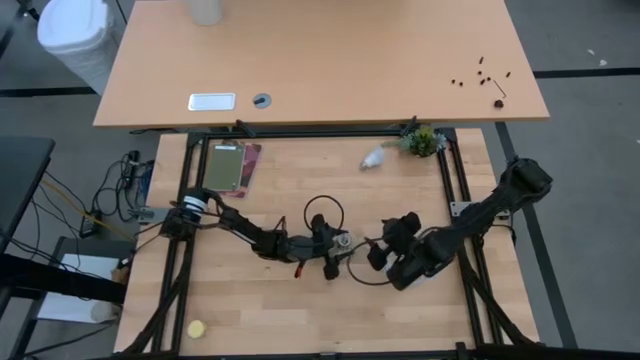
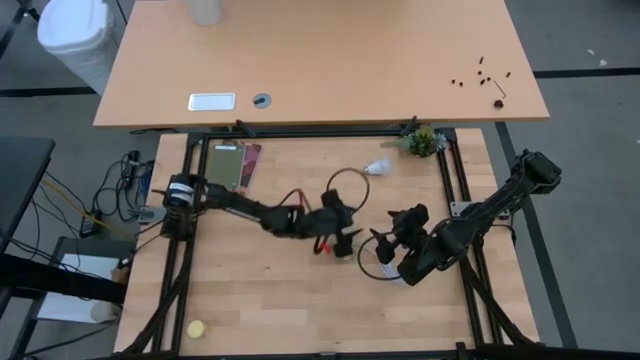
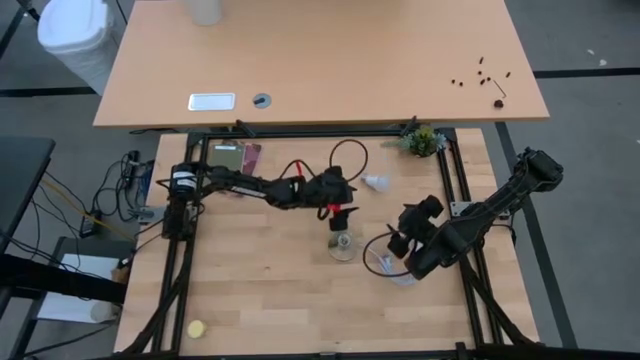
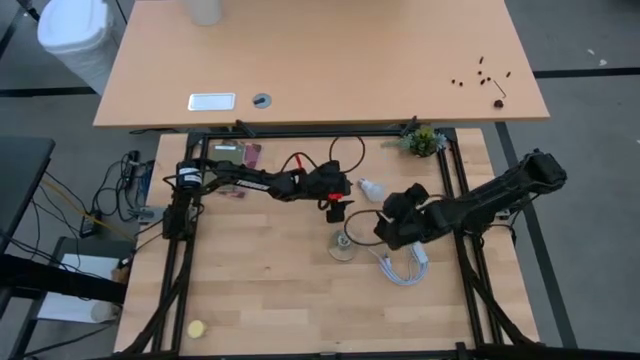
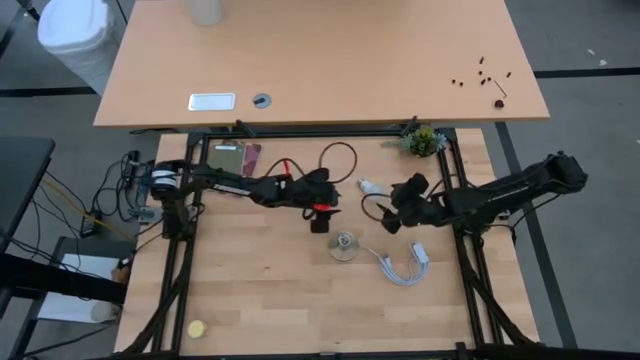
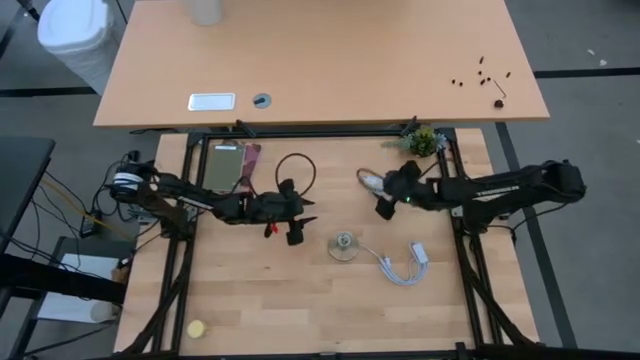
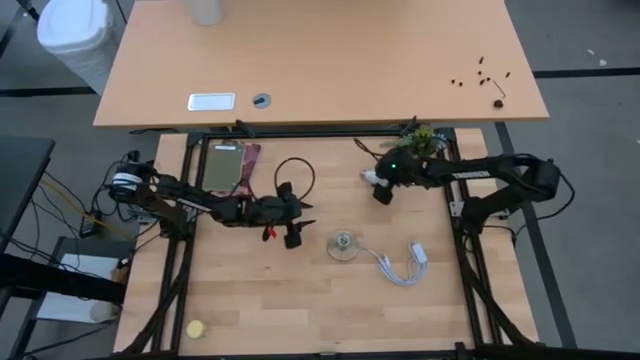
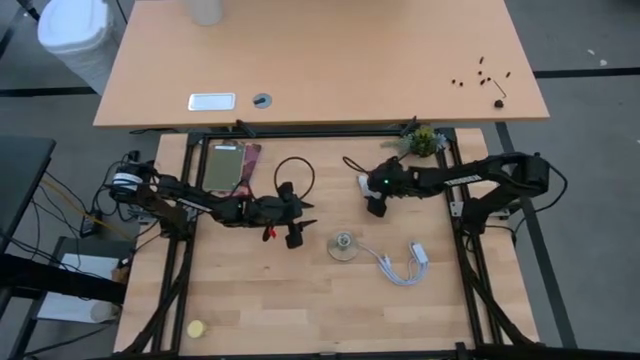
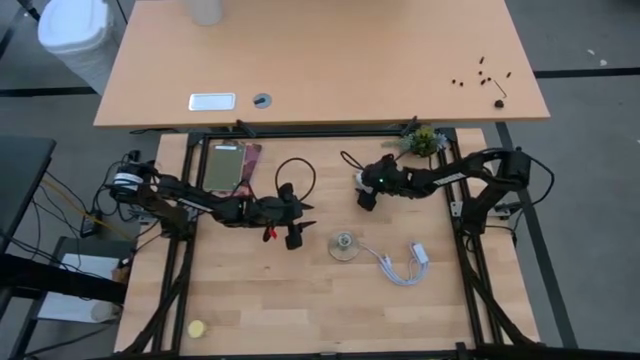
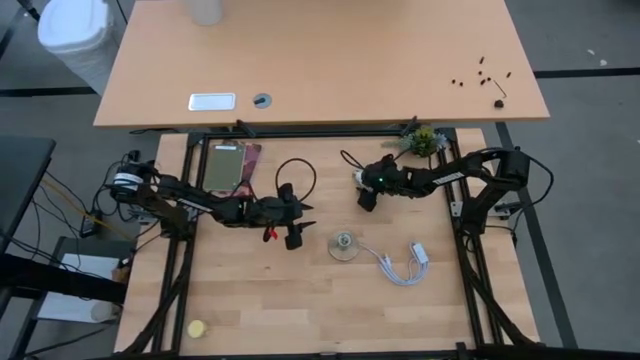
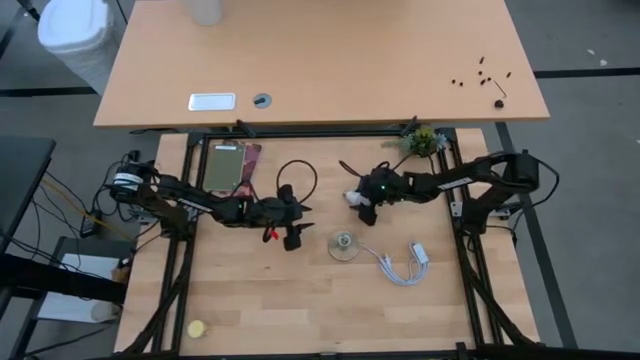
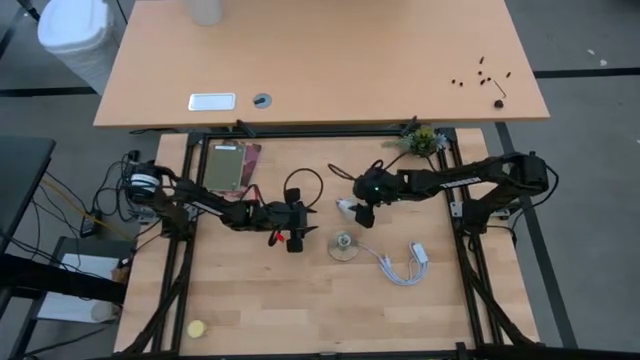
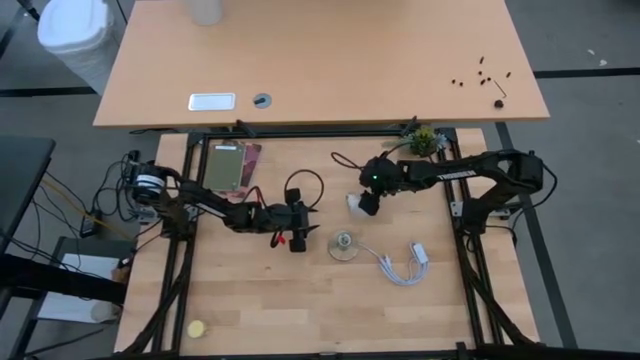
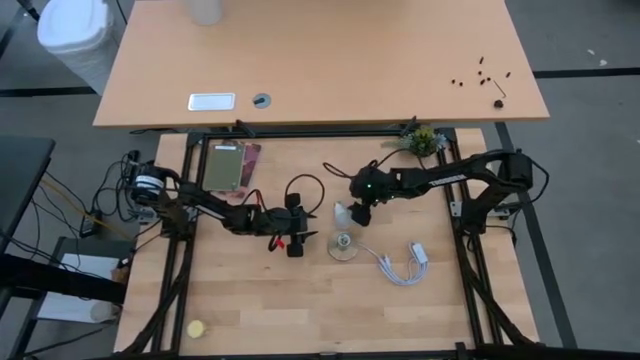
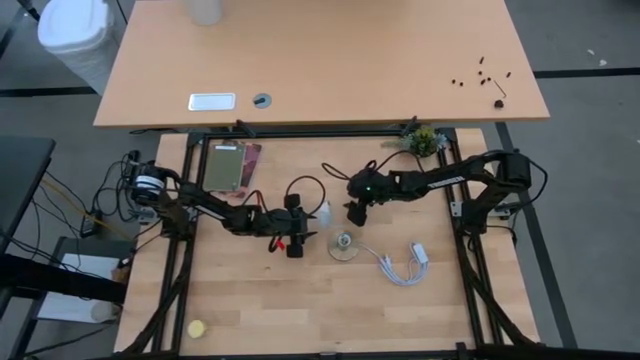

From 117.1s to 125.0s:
Task: Screw lightbulb
Move the white lightbulb to the center of the table

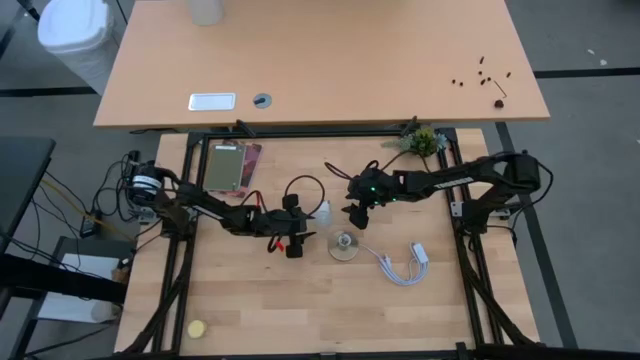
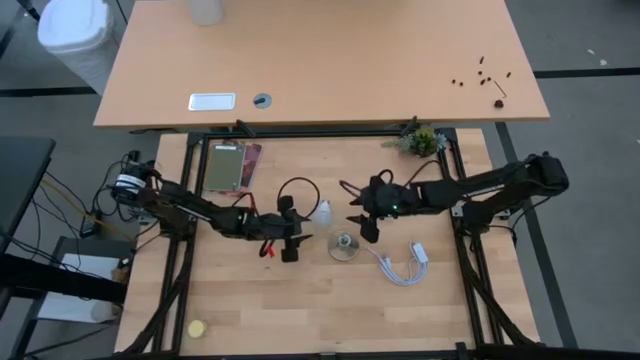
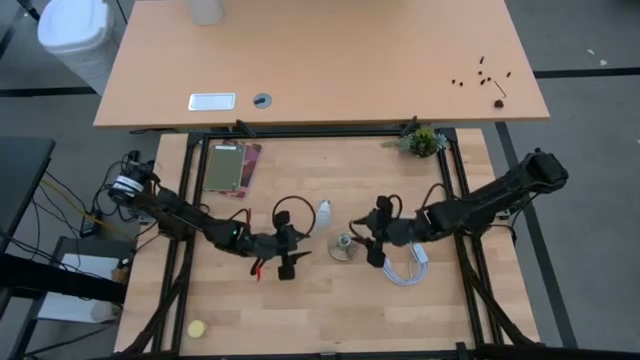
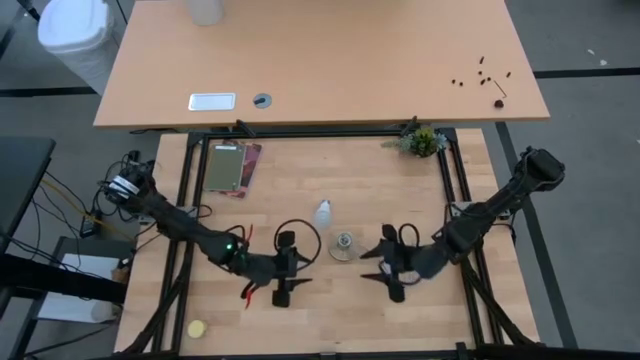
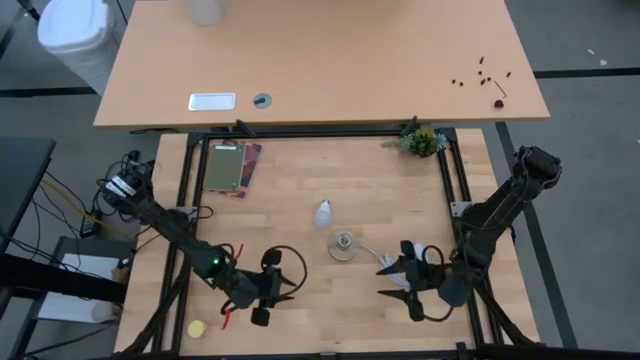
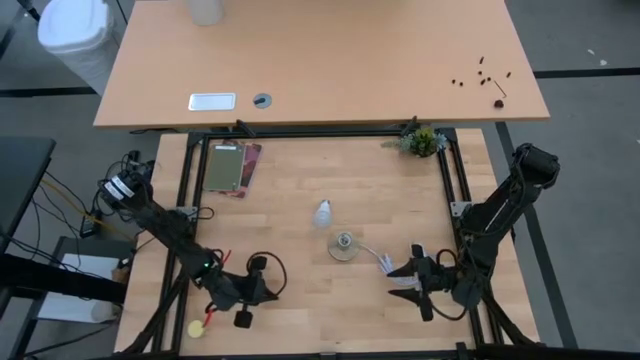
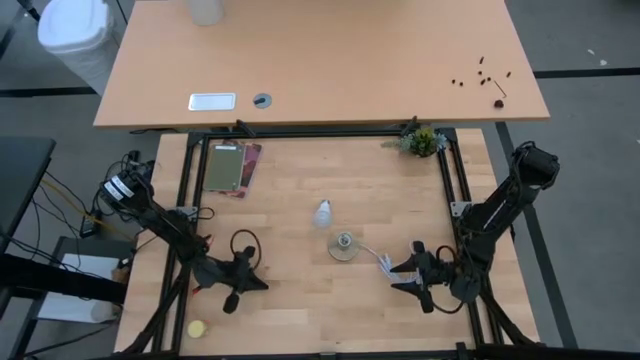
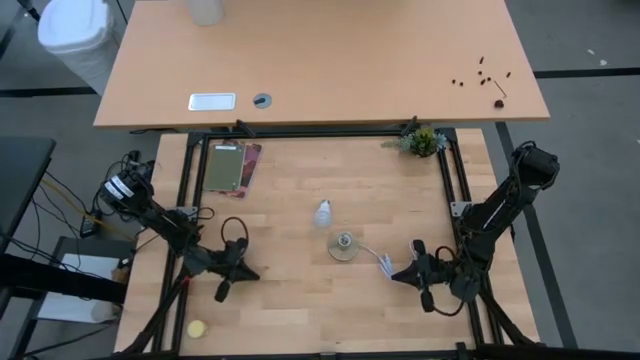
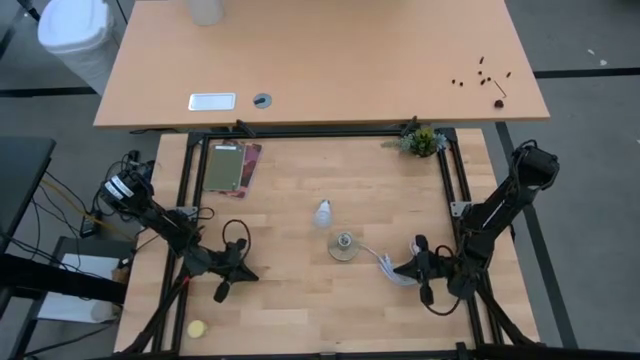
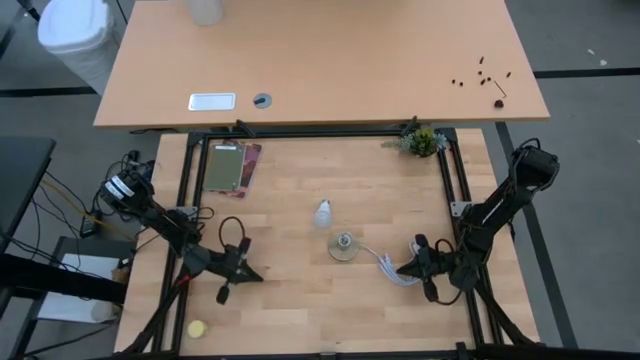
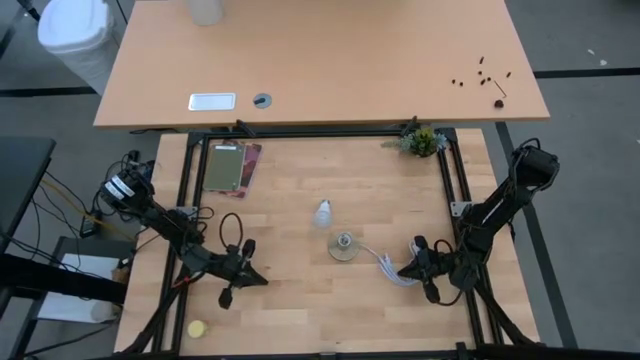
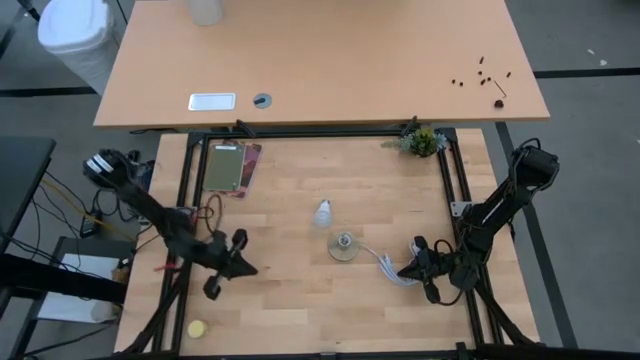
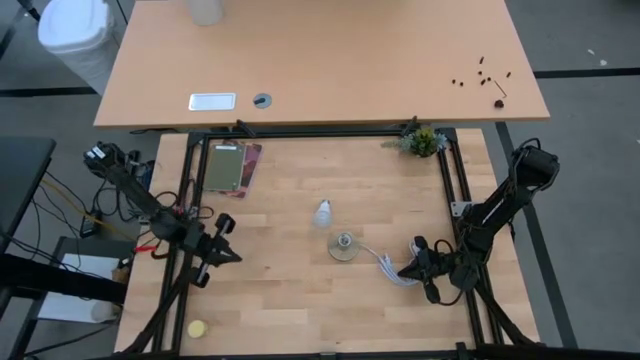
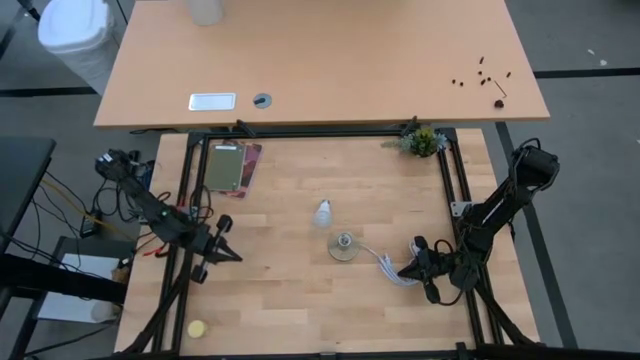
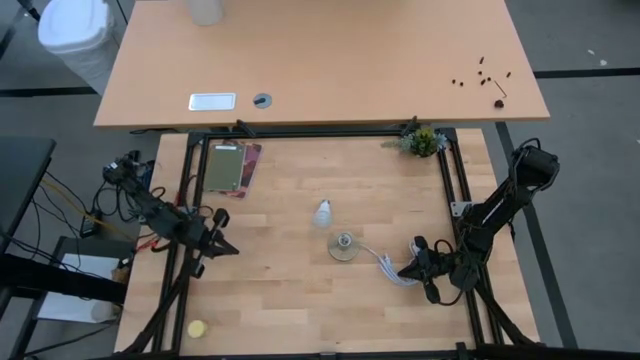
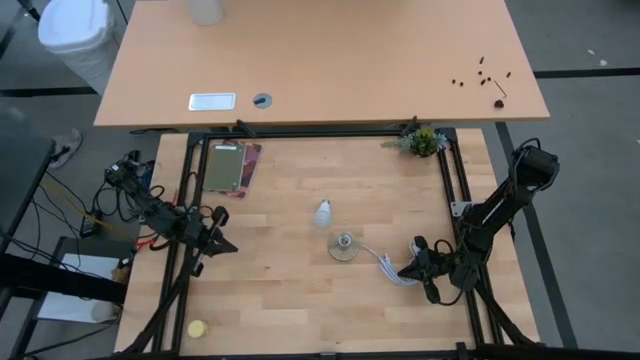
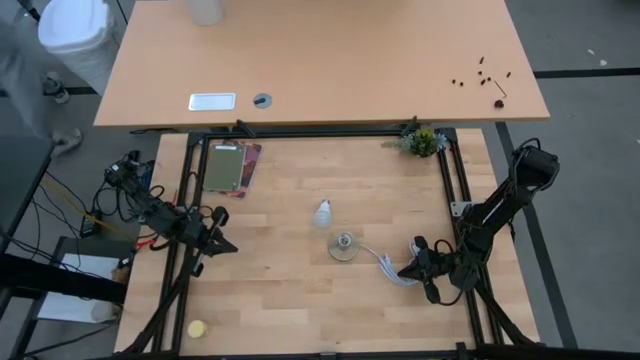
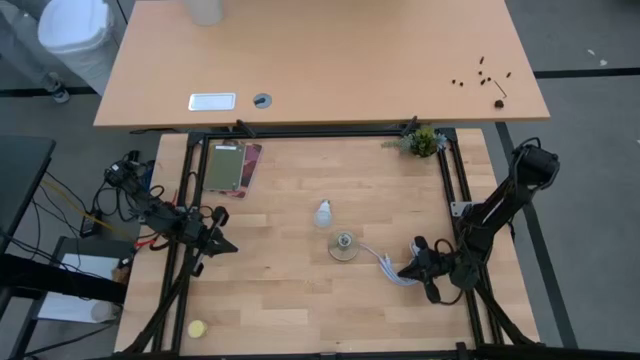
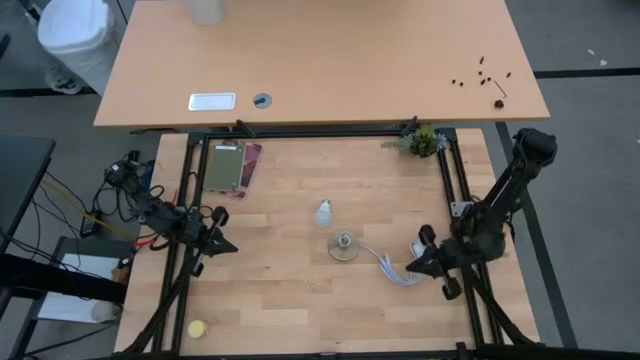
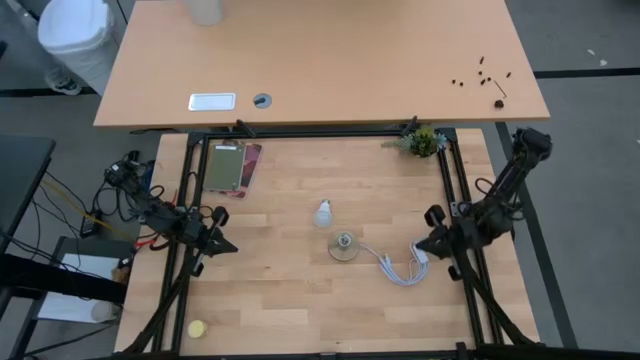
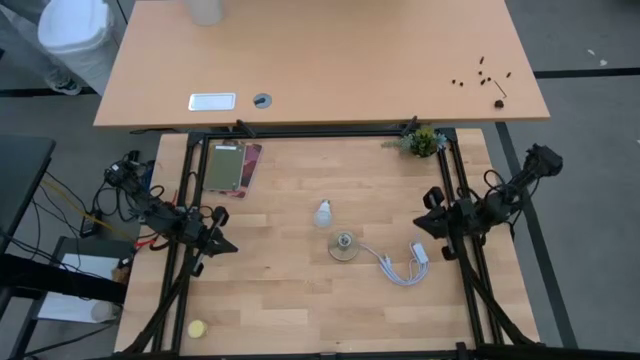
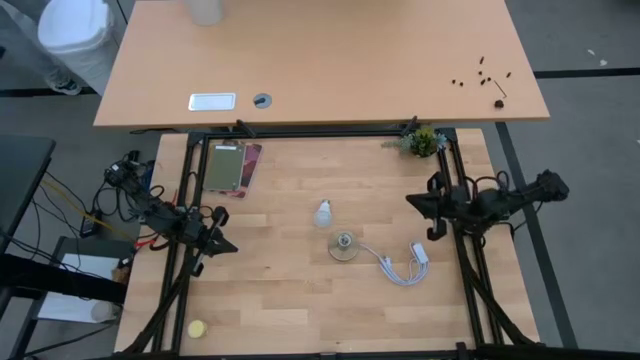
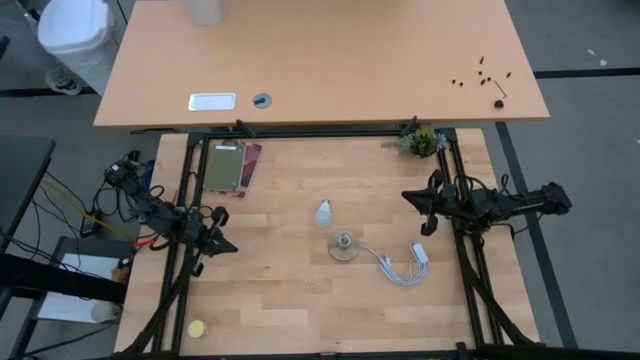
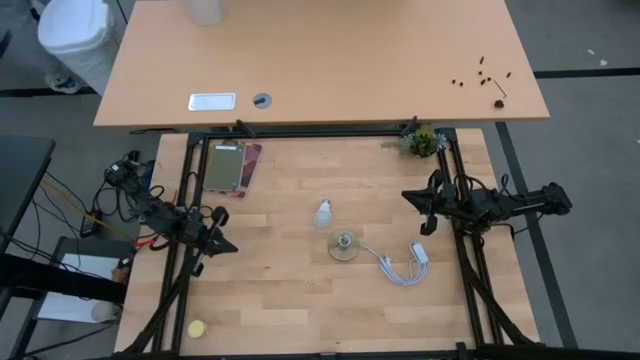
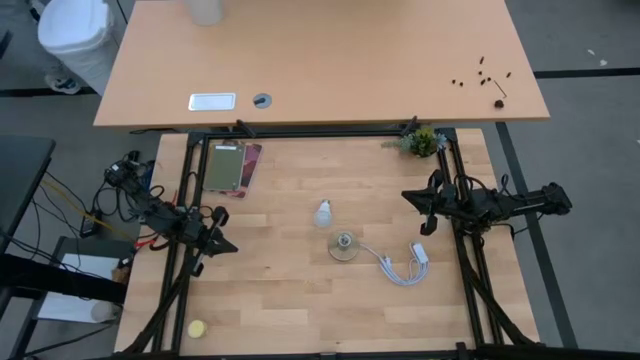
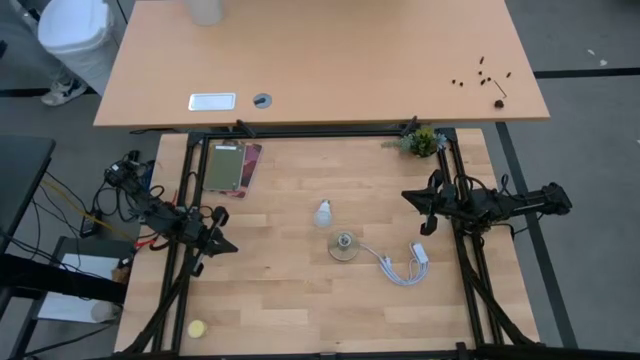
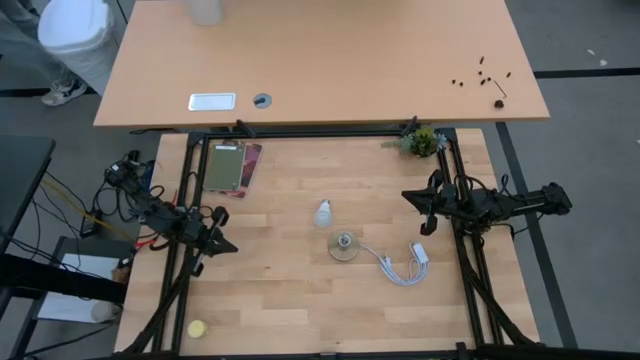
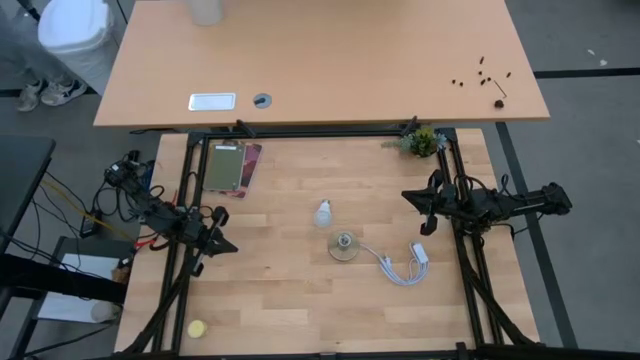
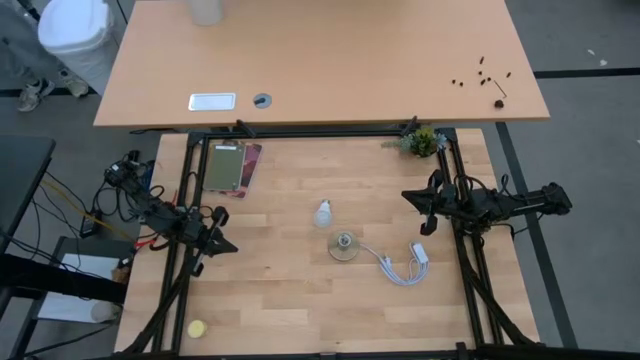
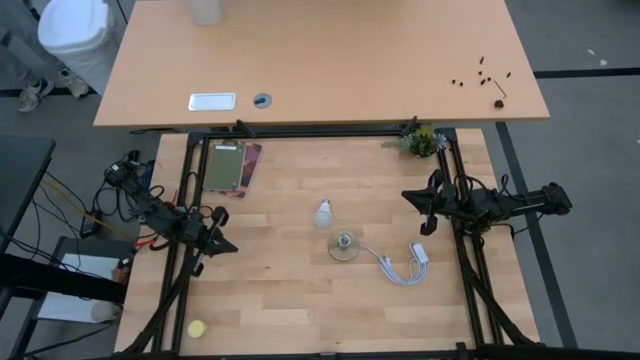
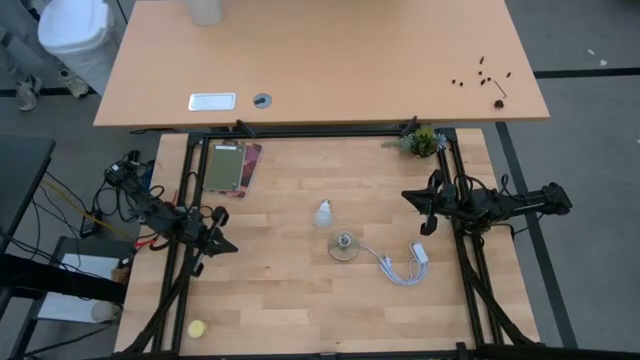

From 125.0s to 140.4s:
Return to Home Position
